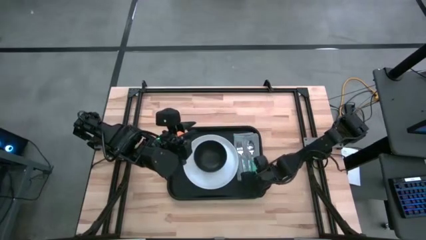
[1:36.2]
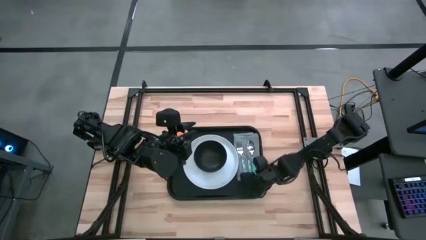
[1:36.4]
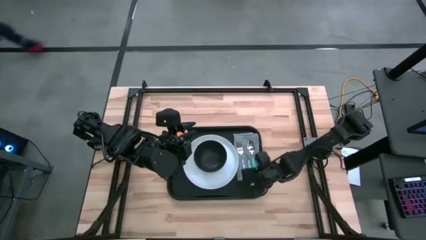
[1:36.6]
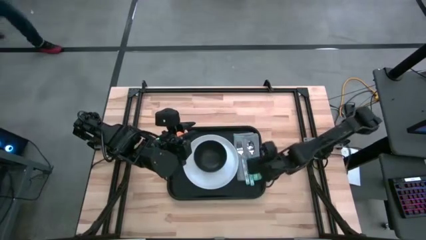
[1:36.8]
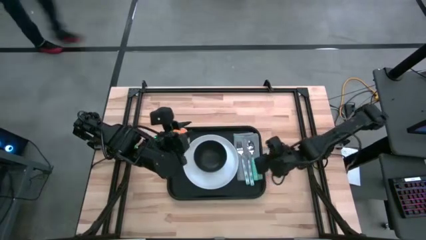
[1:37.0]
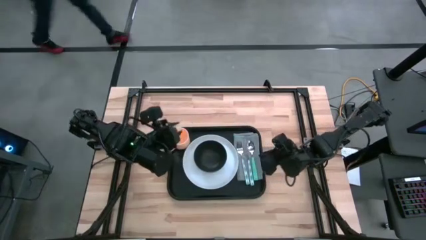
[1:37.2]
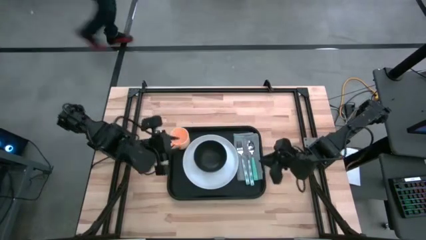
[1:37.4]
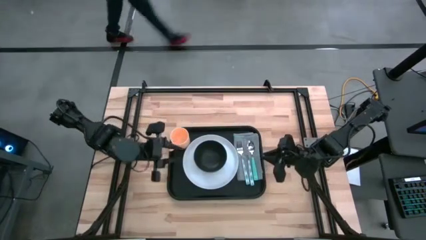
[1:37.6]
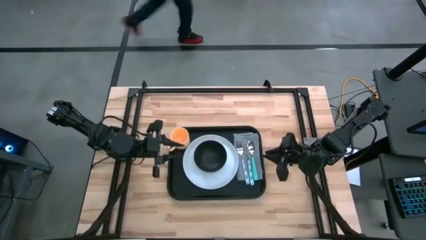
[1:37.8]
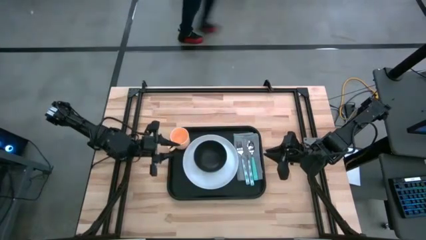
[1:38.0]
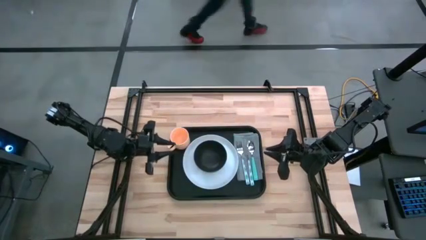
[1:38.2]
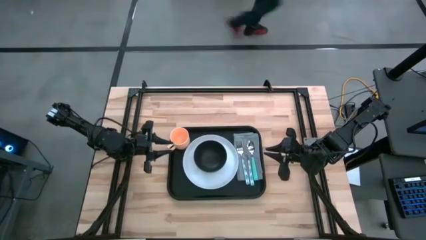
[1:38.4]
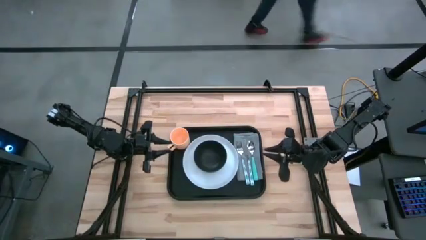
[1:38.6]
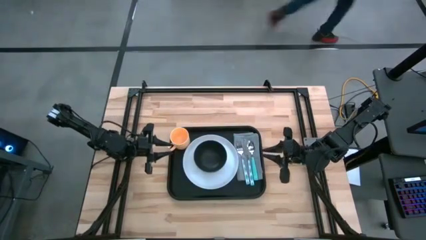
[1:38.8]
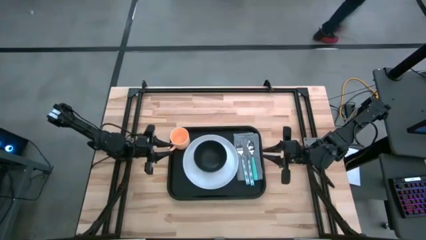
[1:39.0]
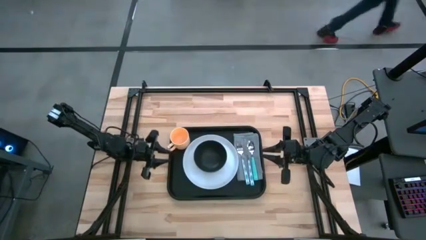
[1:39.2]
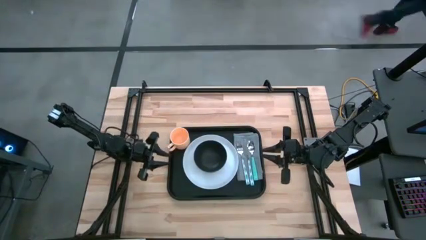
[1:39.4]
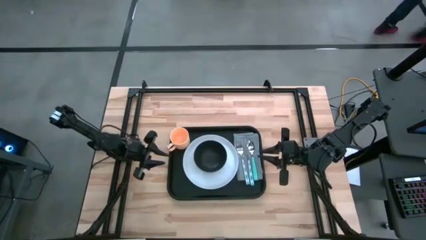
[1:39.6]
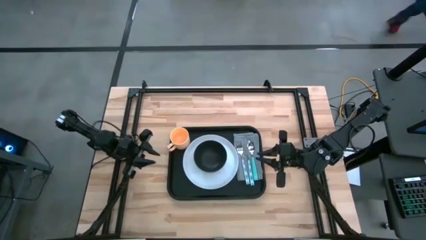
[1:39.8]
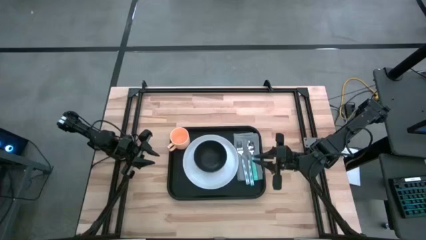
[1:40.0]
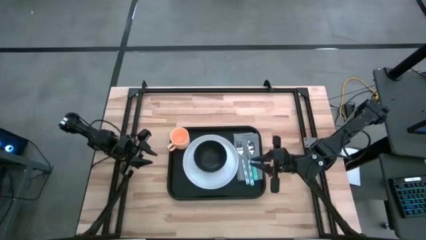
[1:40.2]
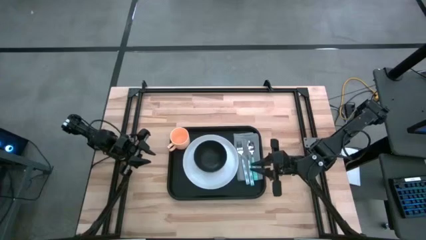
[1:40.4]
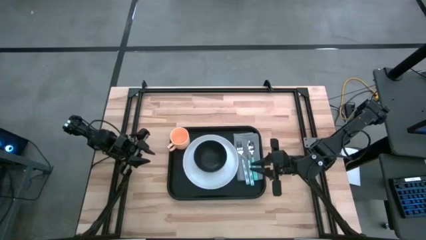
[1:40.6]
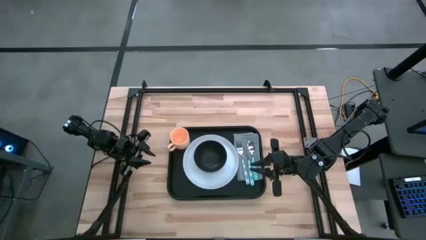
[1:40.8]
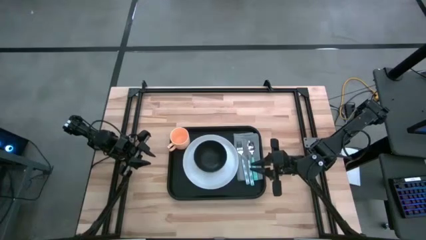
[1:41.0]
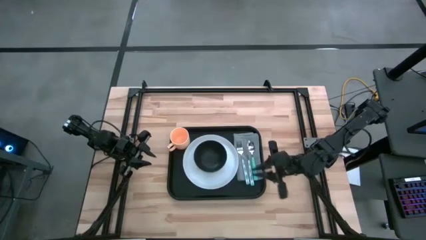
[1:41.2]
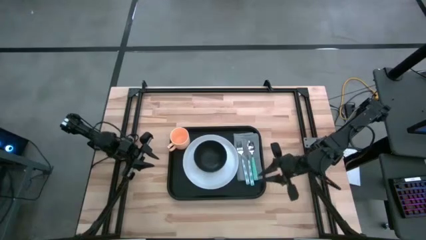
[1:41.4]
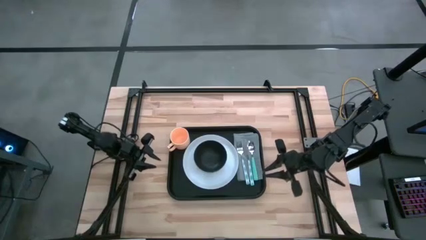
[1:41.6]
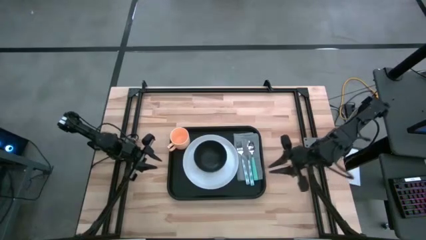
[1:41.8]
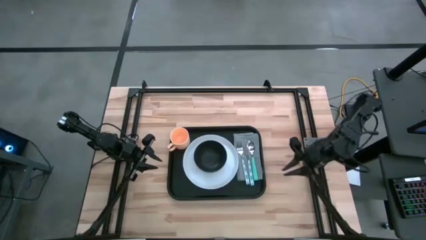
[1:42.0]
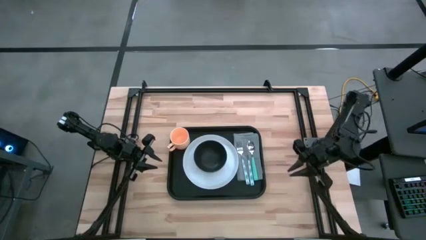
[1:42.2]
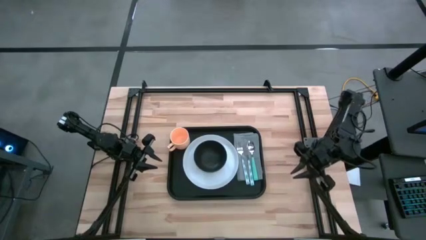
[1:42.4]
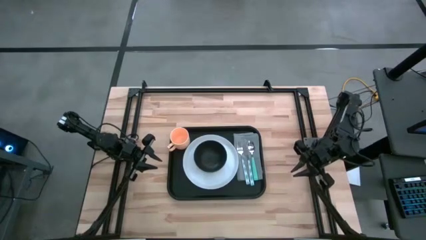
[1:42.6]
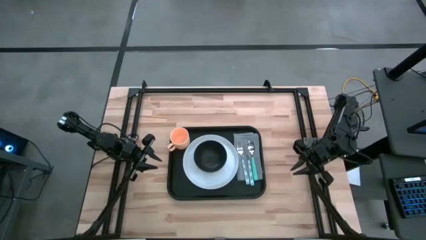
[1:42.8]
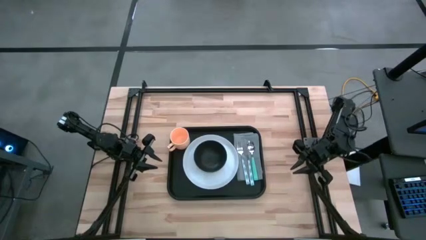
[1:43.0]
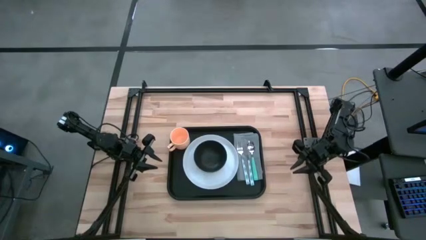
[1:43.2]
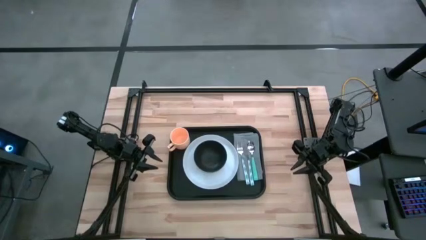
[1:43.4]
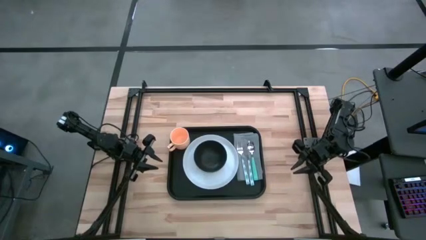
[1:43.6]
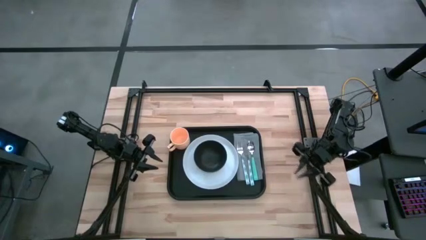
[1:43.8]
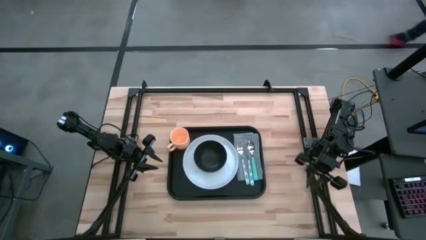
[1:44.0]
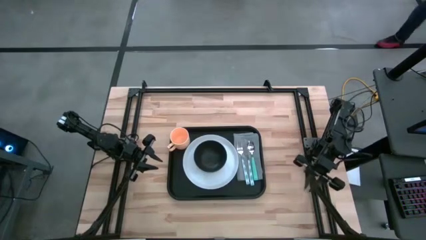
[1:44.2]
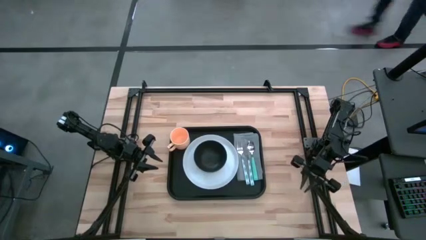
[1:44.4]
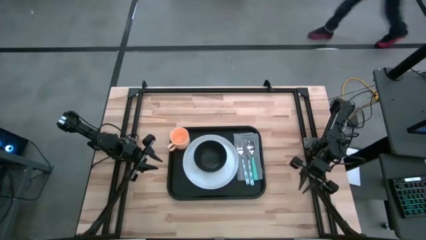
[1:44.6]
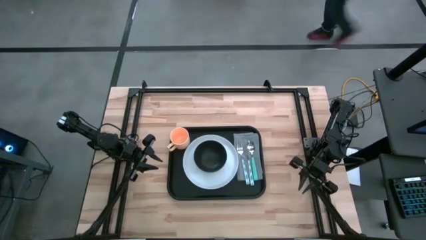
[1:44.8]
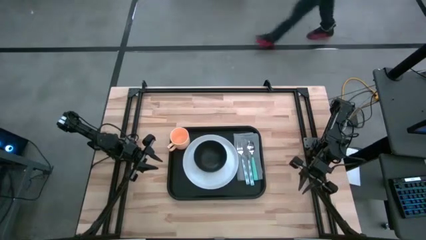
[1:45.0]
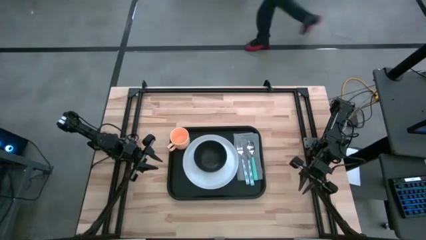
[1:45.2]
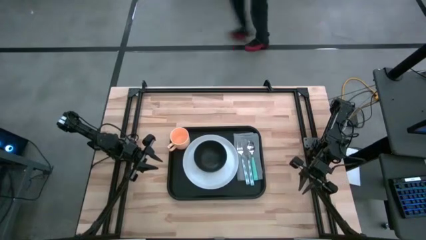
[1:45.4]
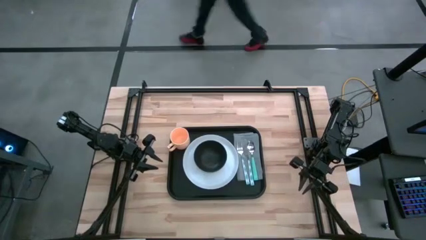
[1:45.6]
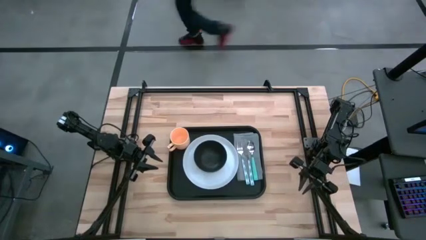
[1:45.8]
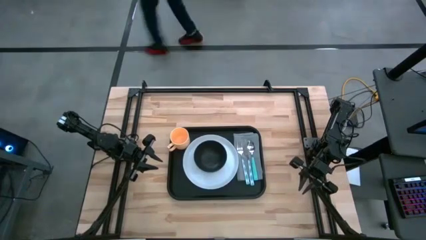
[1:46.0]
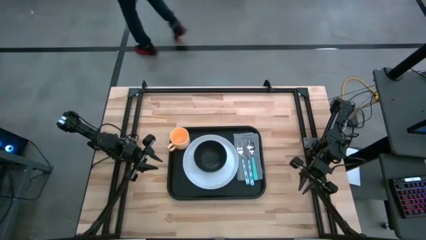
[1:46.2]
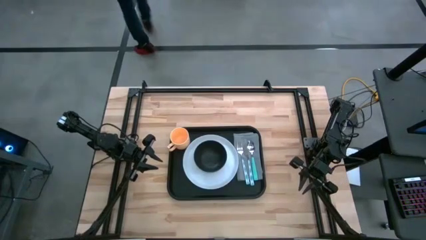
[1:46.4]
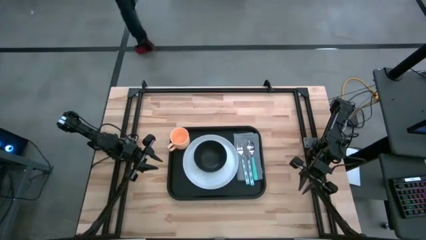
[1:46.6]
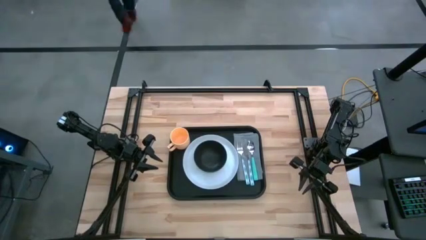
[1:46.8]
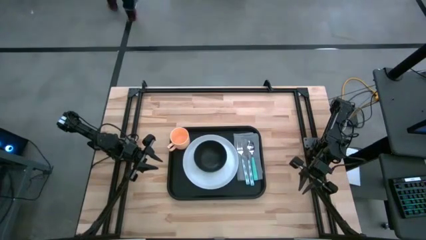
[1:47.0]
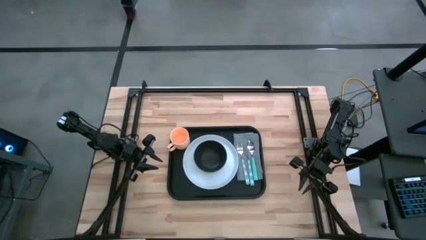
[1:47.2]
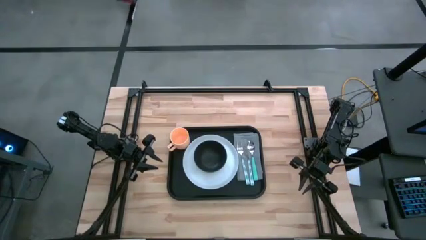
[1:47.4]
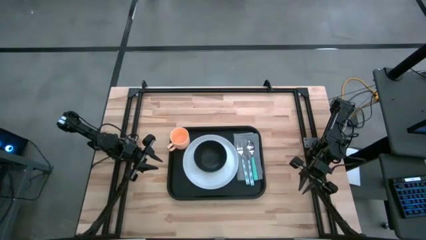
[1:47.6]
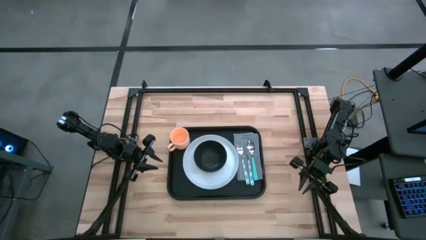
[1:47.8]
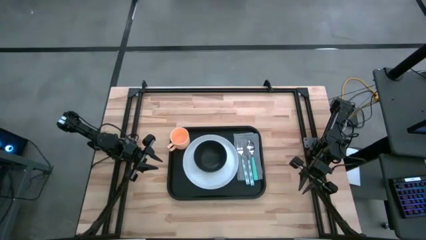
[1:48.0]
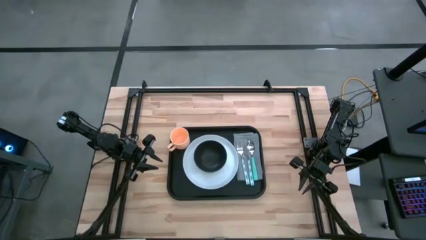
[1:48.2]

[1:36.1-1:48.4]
Task: Set up tray
Return to Home Position

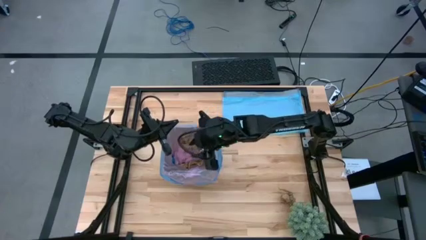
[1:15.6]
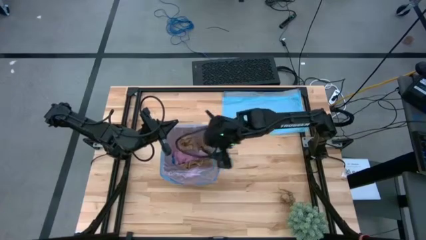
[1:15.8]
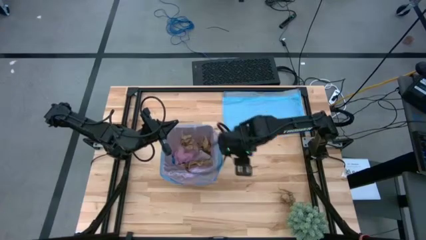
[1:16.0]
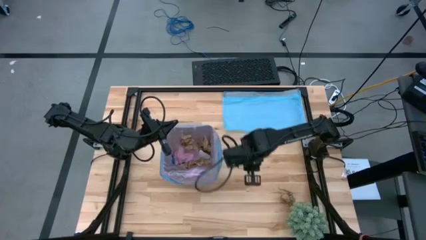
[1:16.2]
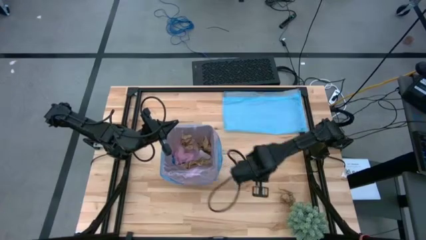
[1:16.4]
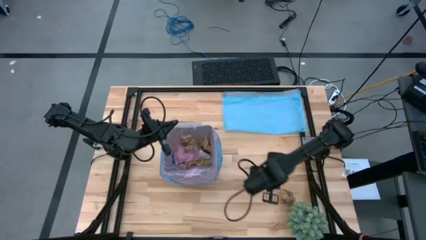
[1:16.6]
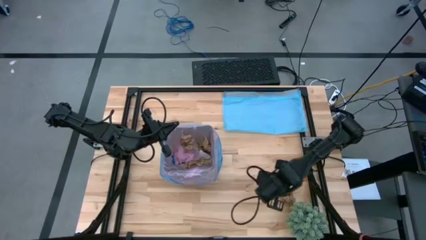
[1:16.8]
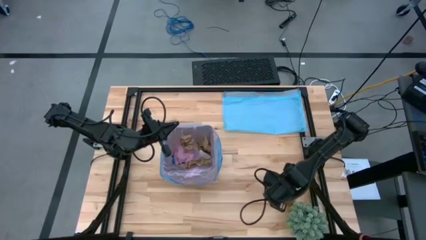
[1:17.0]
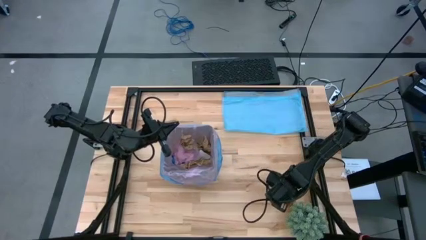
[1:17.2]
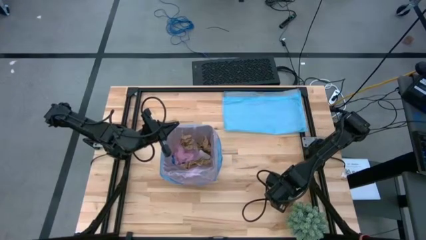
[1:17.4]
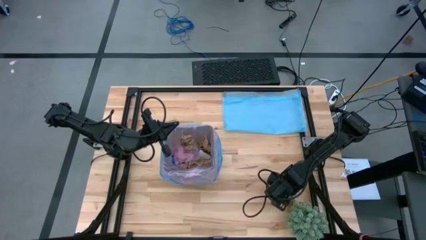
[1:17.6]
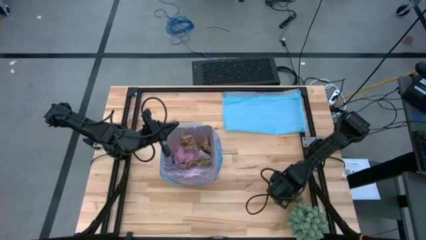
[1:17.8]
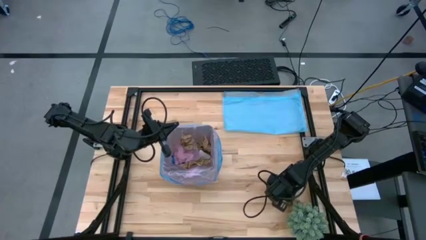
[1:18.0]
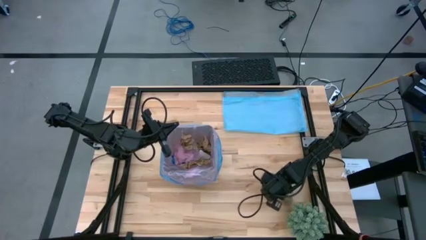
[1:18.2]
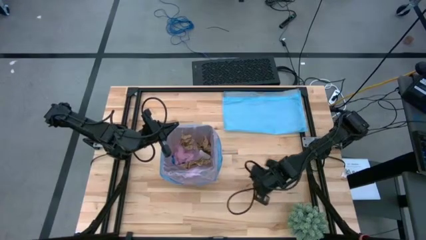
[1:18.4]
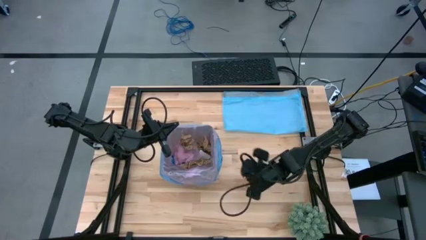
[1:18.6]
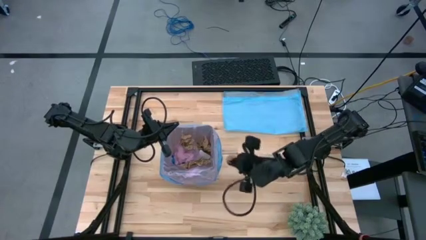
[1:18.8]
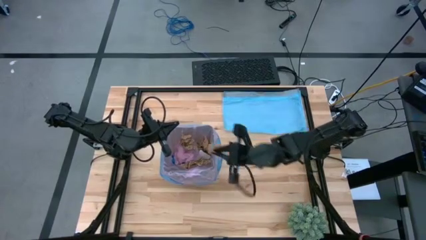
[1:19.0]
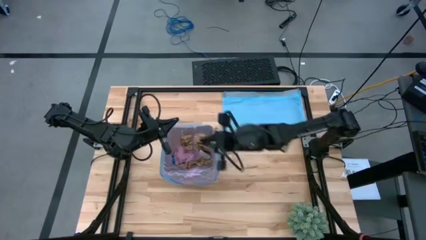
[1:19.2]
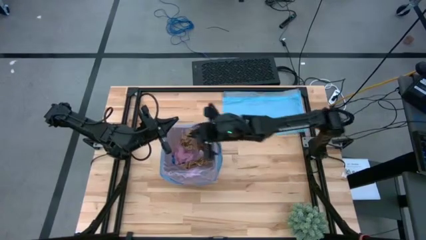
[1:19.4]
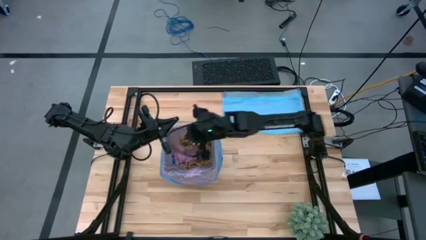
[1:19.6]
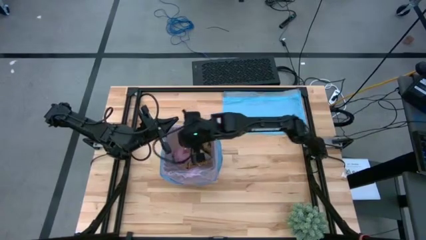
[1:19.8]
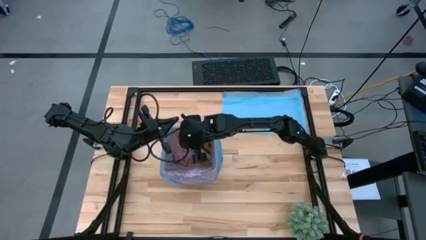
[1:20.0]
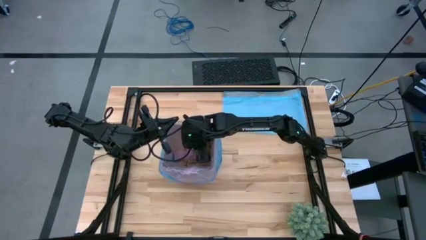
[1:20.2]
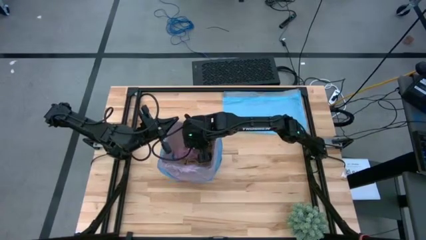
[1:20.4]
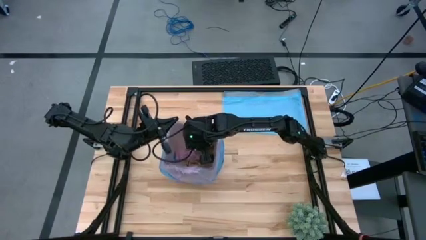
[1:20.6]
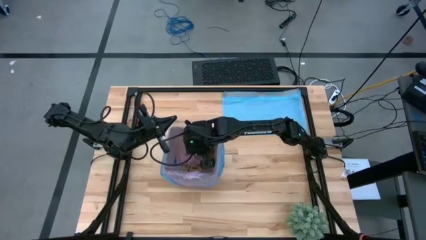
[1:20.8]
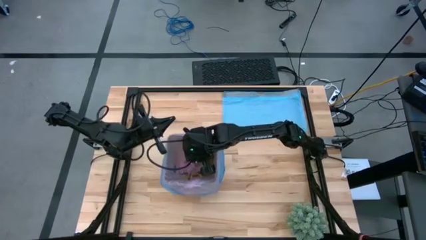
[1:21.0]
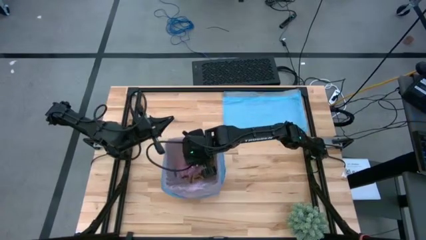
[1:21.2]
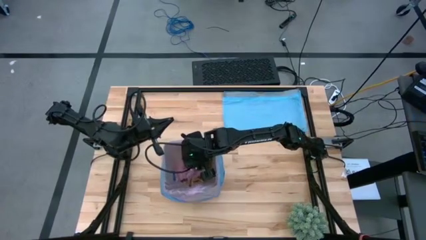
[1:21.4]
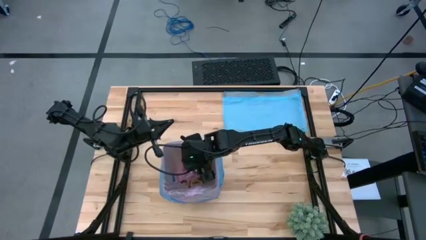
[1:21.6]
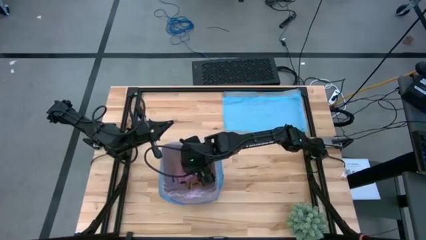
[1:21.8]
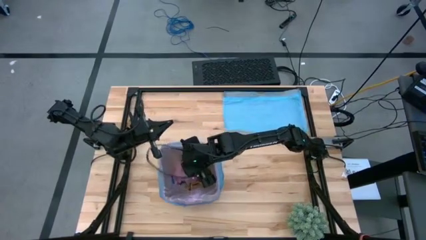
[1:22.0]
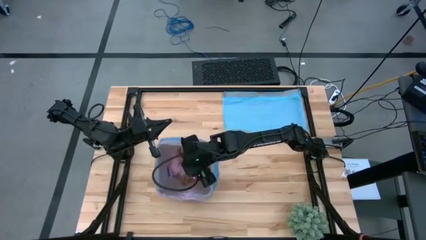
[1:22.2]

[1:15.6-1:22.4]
Task: place trash/remove bag and relplace
Put the brown napkin into the trash bin
